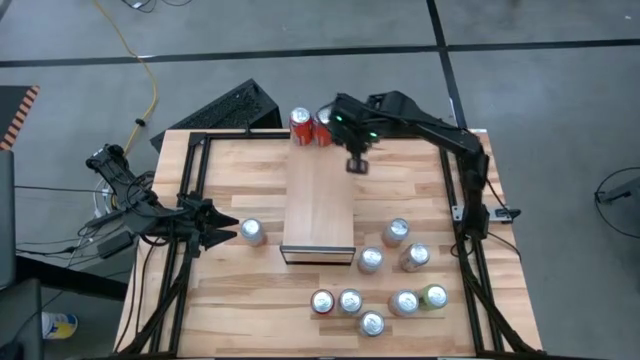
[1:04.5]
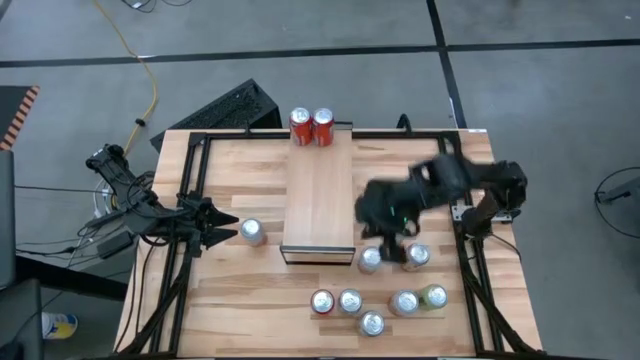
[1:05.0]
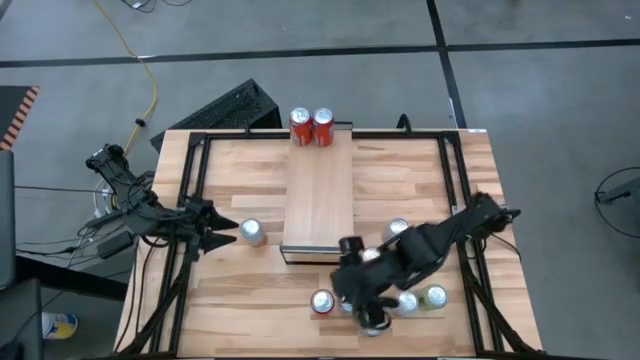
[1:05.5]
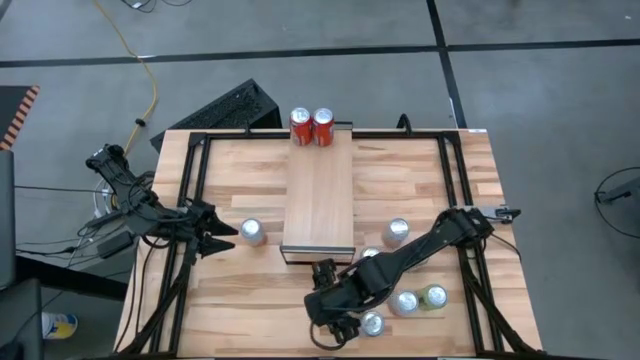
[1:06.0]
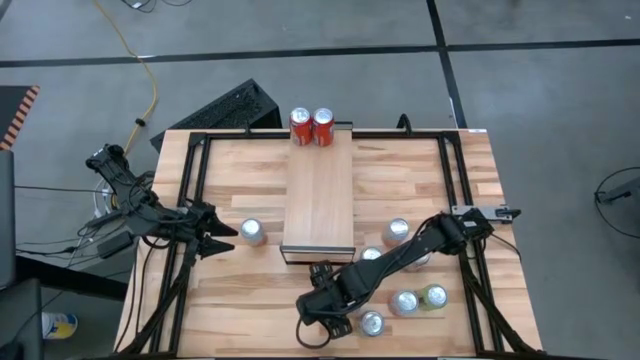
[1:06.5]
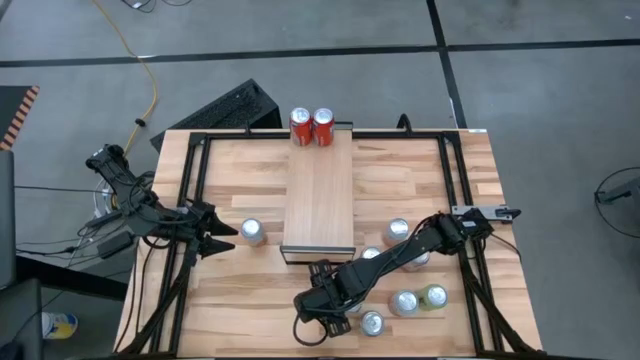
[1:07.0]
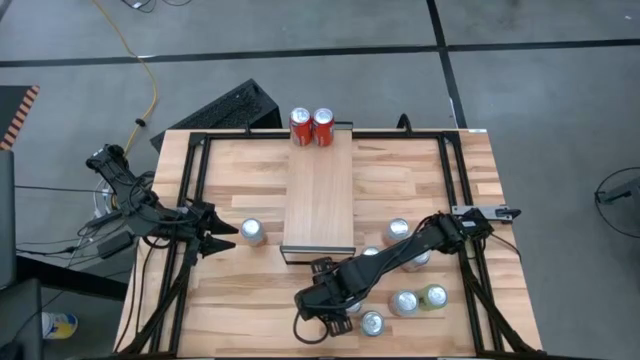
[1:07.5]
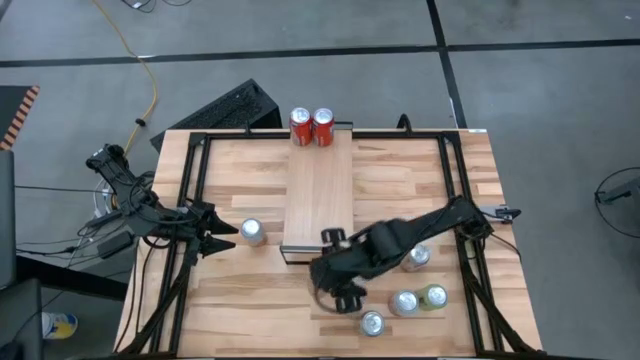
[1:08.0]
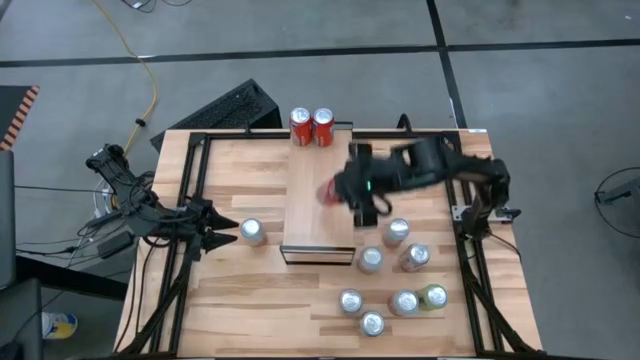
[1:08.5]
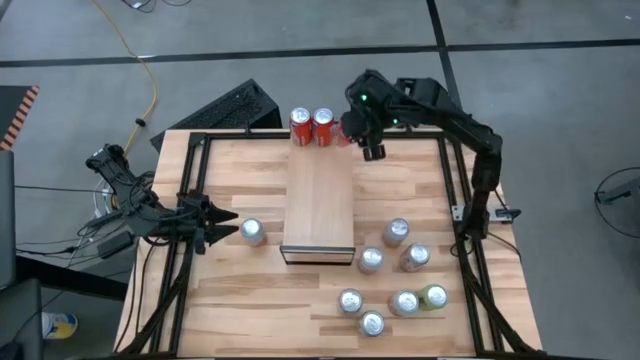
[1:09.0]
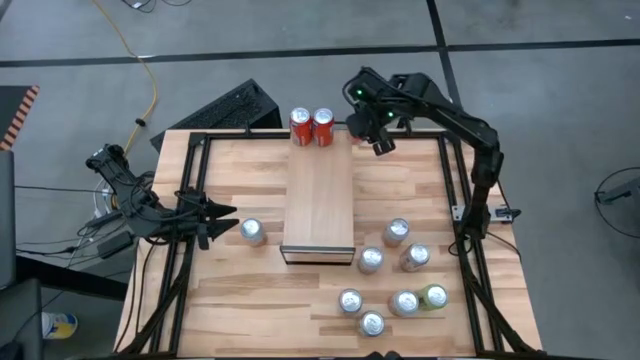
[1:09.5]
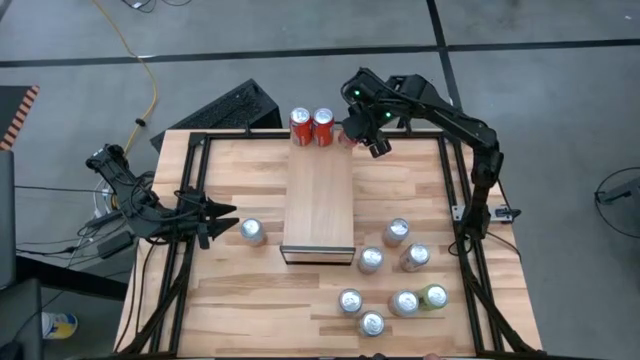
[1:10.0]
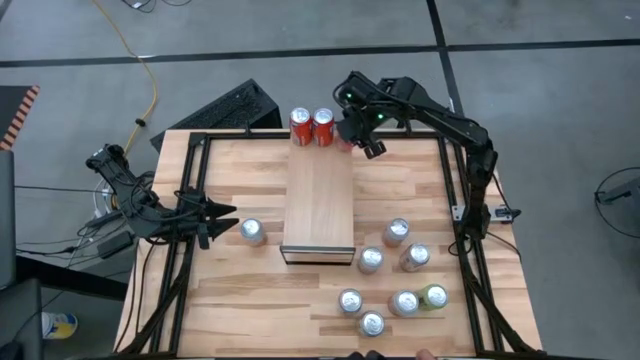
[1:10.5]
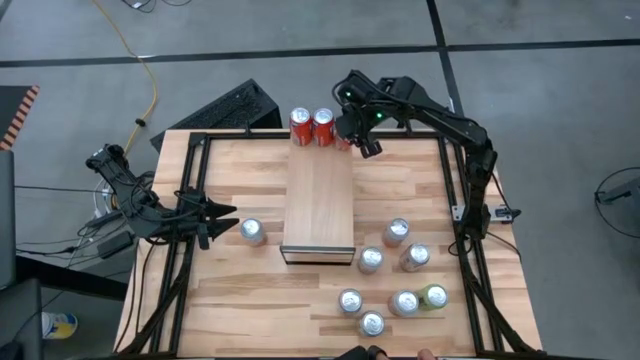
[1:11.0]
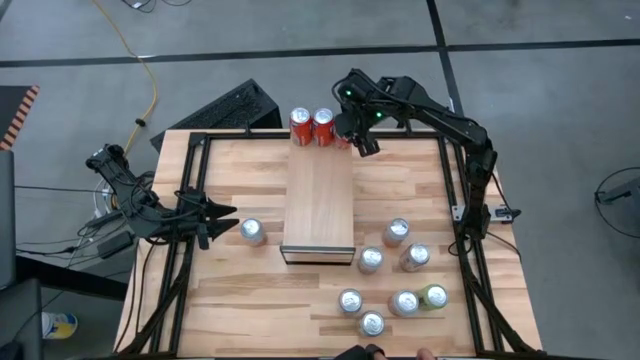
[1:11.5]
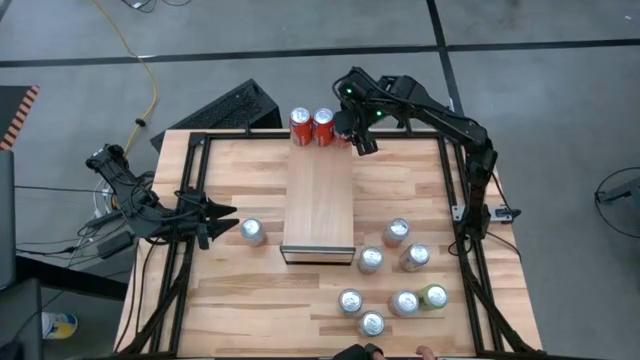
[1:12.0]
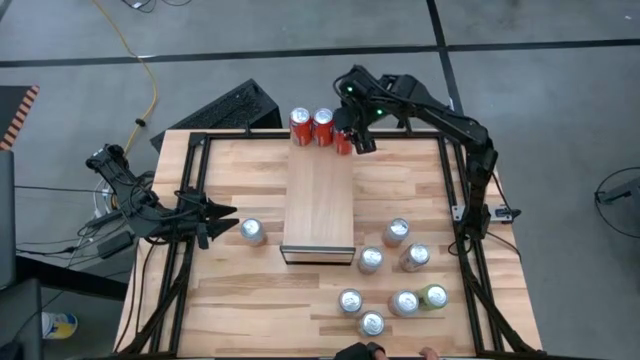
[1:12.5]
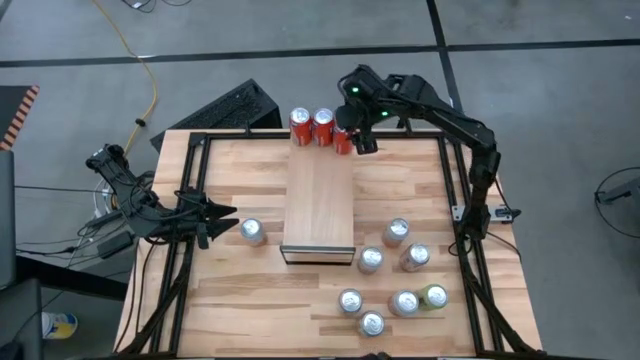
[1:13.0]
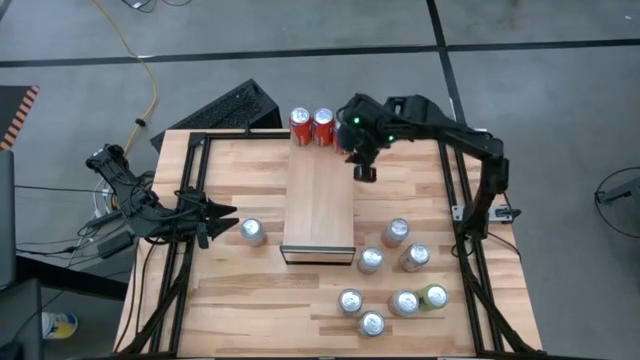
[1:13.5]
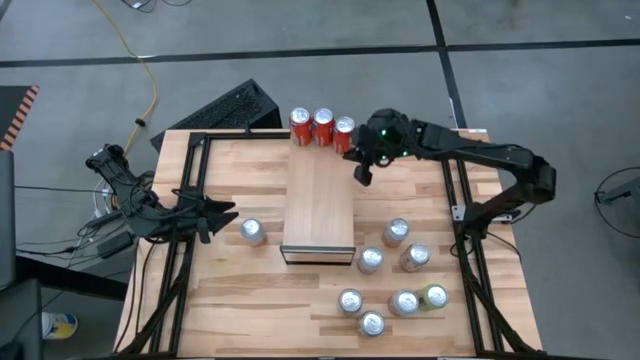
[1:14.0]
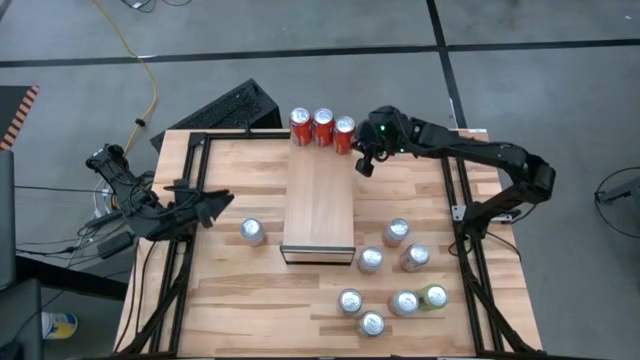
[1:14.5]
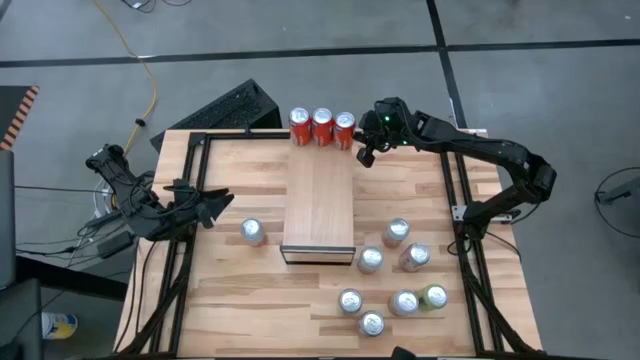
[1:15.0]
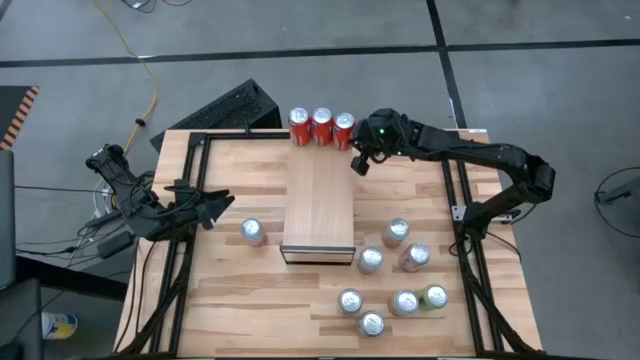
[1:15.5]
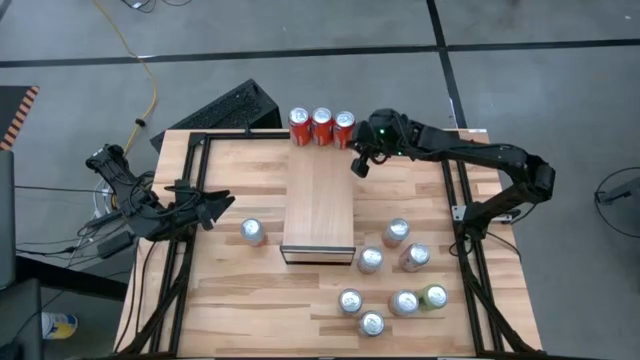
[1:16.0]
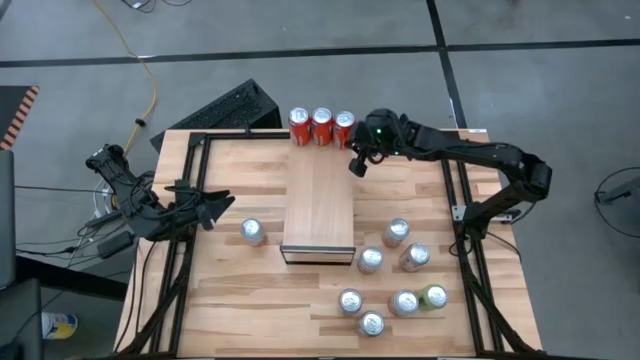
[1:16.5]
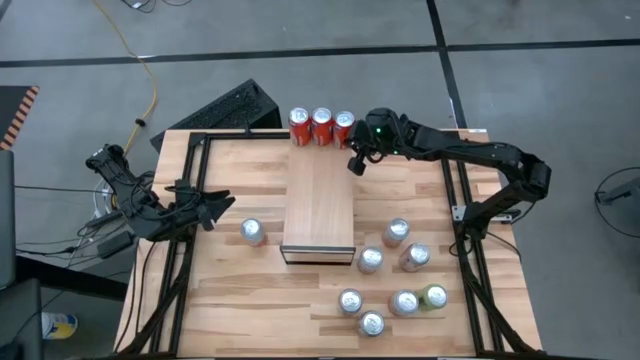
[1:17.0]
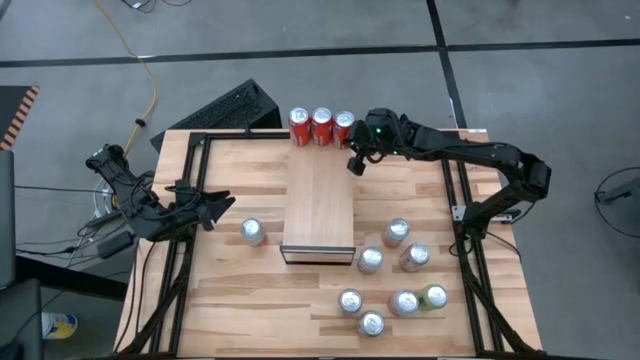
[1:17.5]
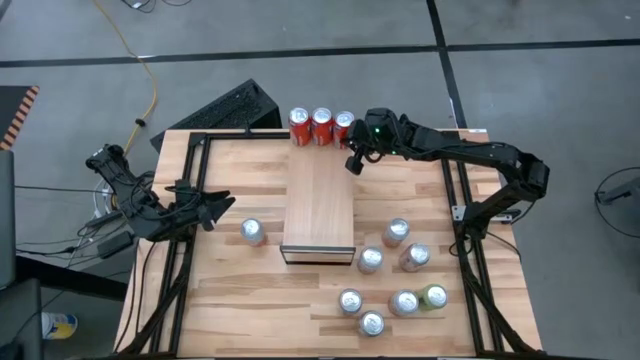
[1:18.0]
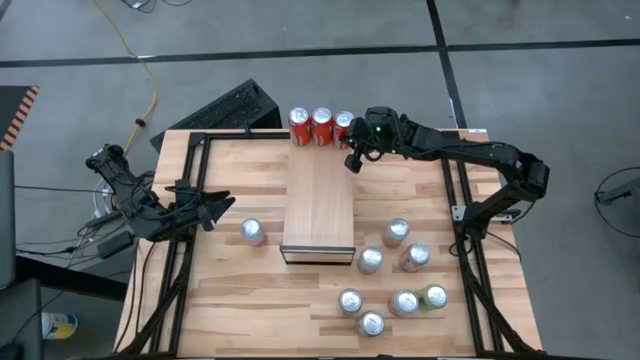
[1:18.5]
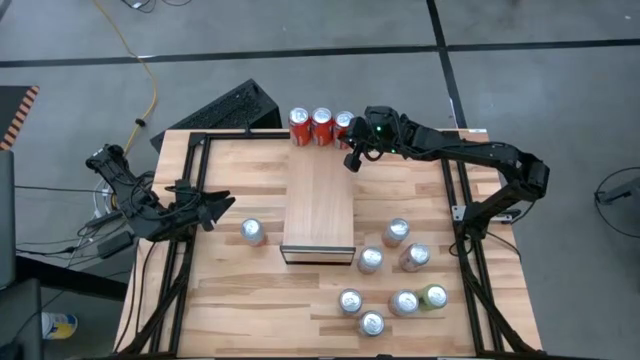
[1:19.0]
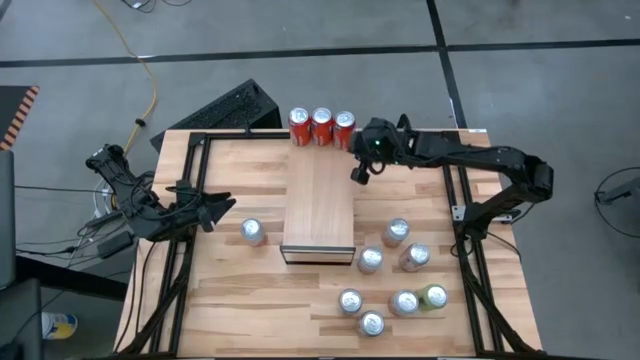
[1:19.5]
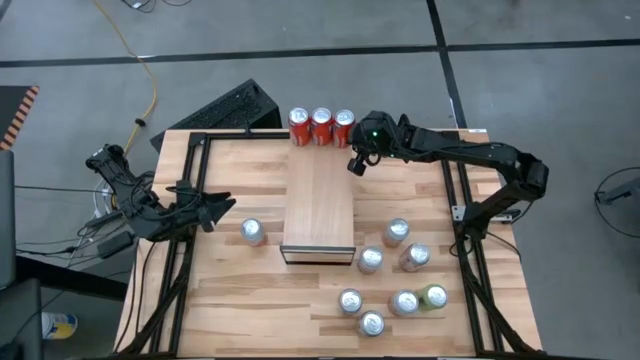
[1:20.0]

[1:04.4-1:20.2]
Task: Place canned beverage on shelf
Put the red soda can on the shelf aligned with the other red soda can

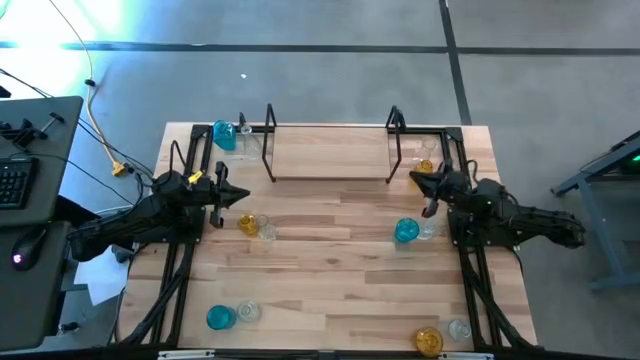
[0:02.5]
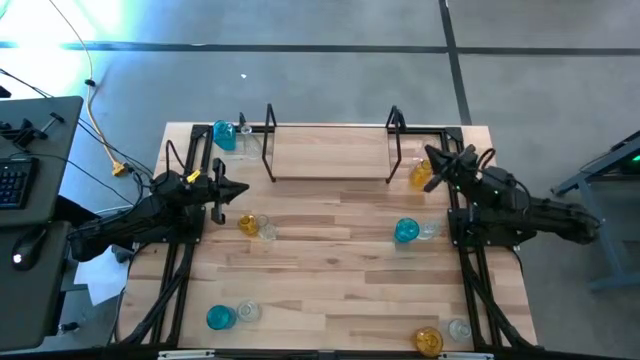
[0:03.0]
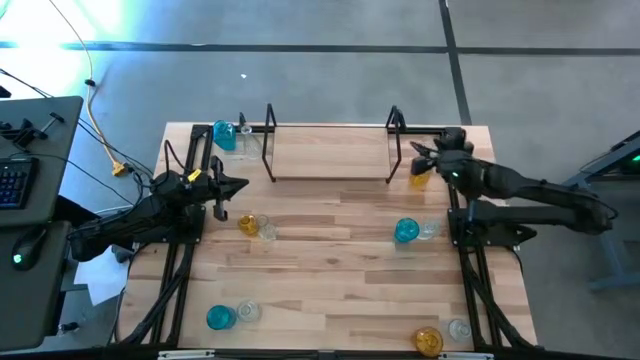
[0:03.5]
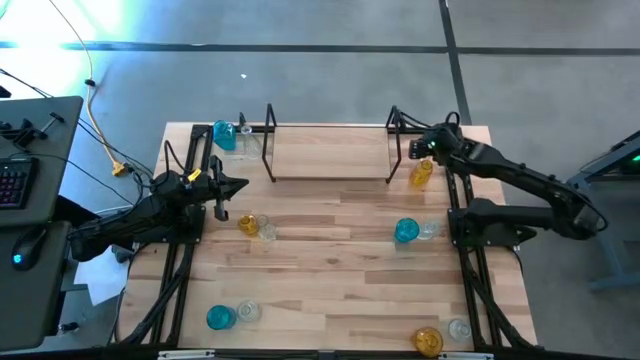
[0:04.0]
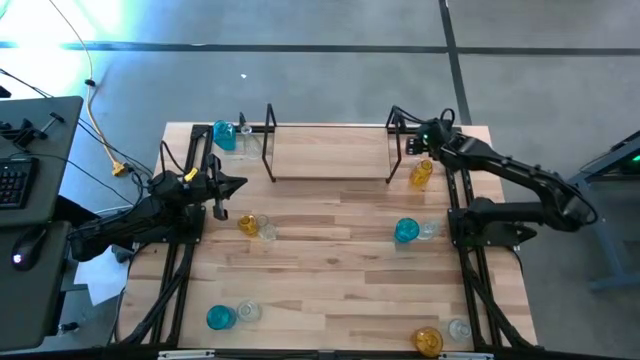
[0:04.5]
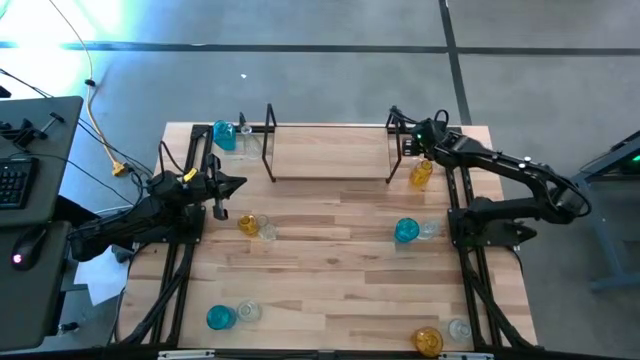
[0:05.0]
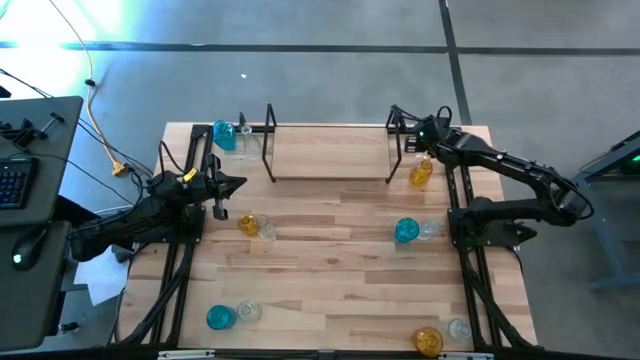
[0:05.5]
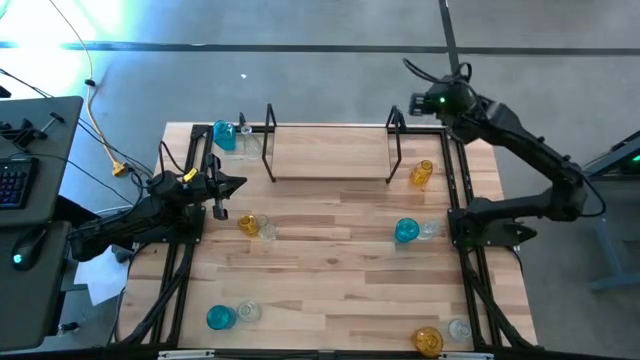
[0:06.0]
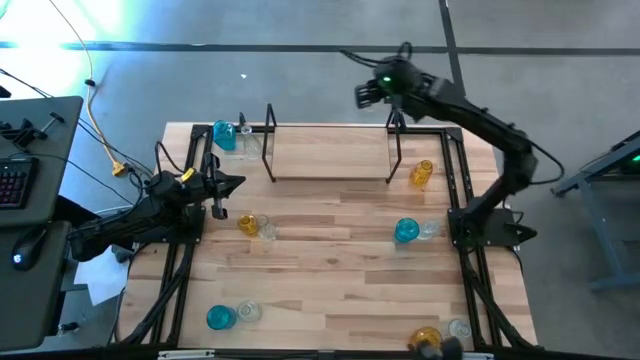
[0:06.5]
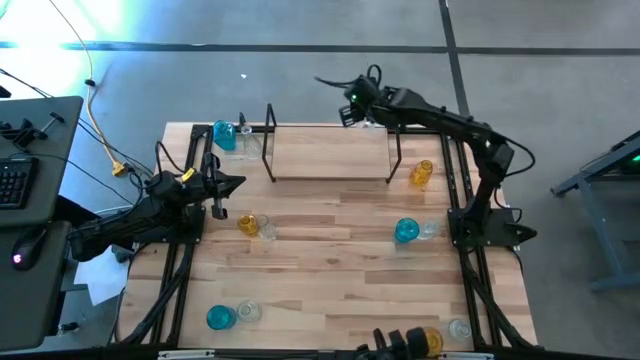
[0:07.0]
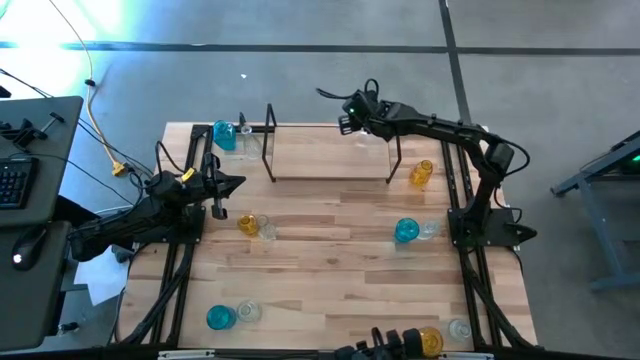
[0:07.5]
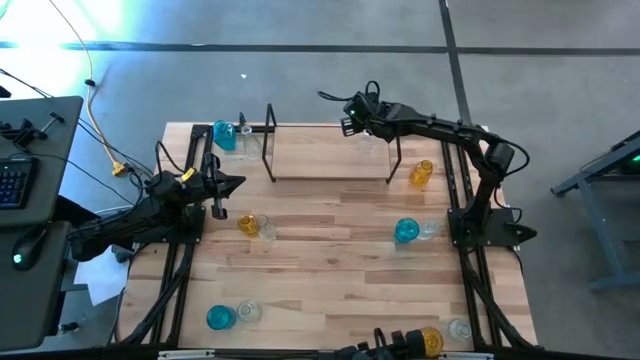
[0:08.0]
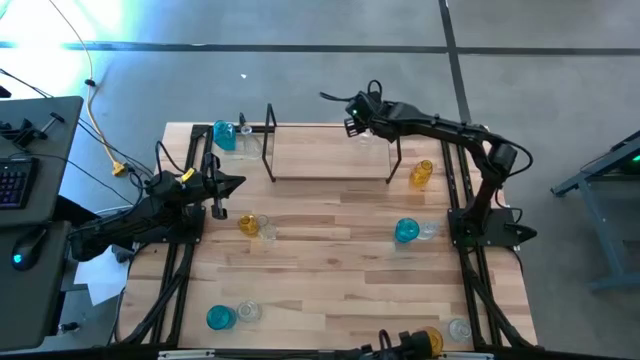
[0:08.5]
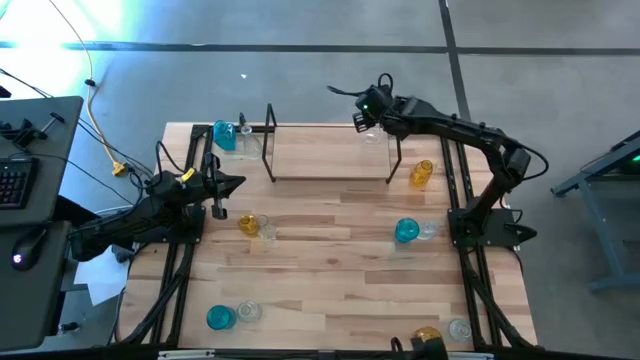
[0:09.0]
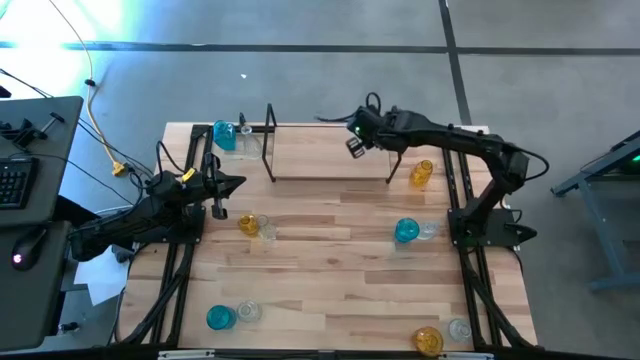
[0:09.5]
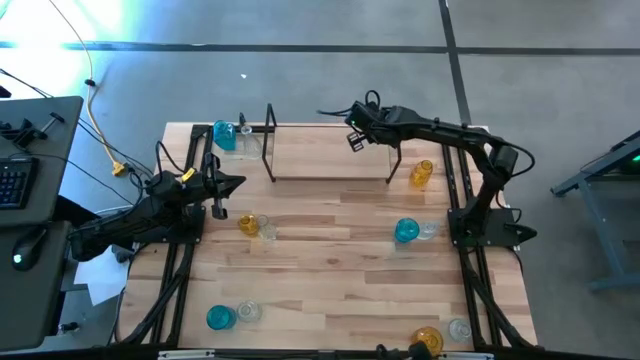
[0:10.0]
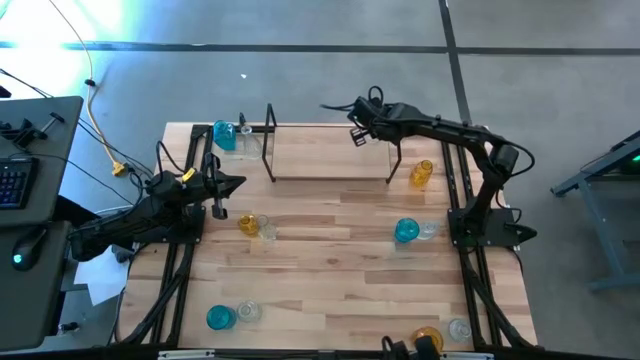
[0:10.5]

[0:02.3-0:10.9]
Task: sort vases onto shelf
Put the transparent vase on the shelf
